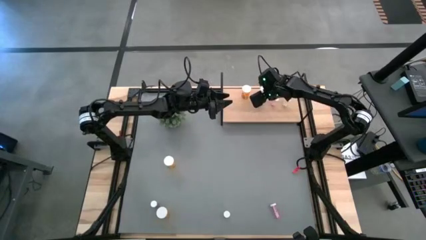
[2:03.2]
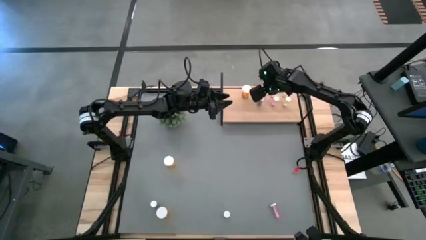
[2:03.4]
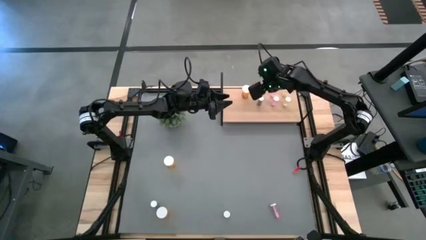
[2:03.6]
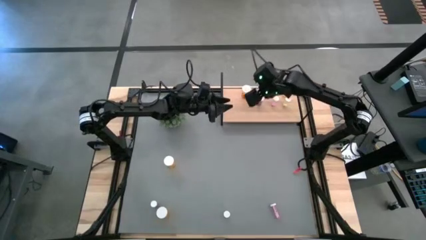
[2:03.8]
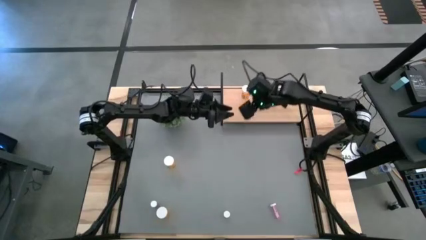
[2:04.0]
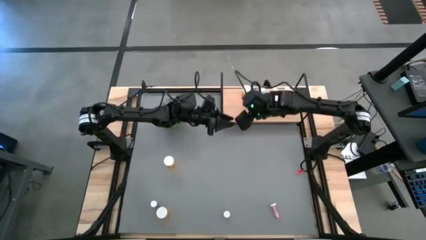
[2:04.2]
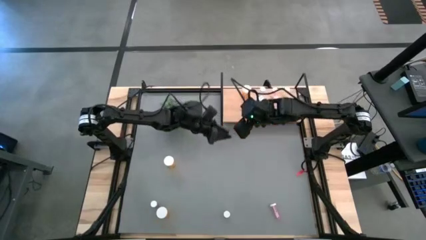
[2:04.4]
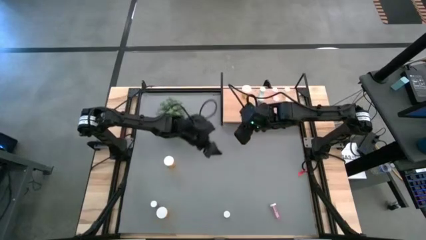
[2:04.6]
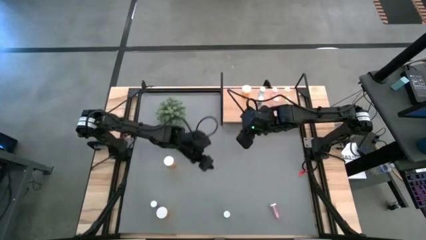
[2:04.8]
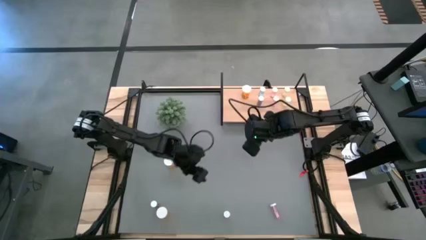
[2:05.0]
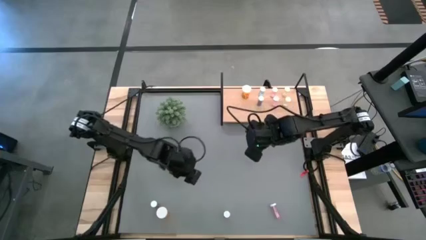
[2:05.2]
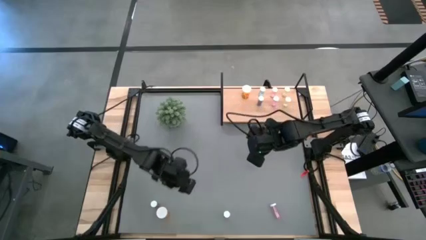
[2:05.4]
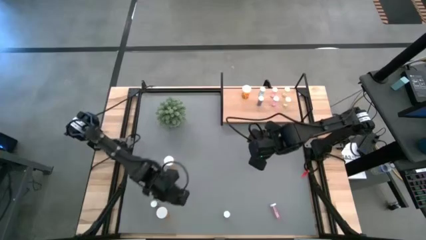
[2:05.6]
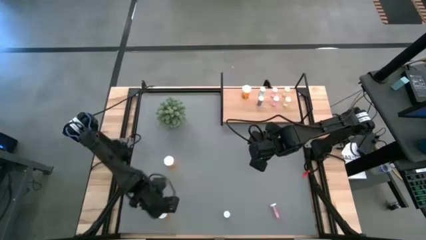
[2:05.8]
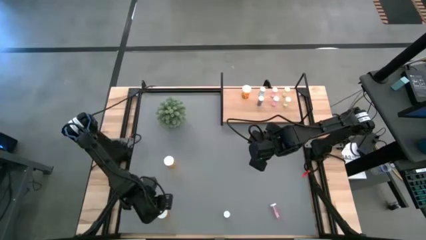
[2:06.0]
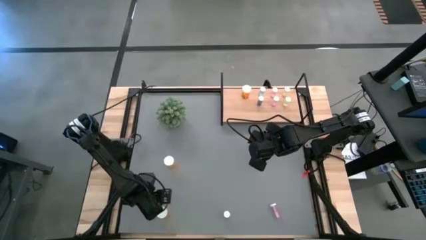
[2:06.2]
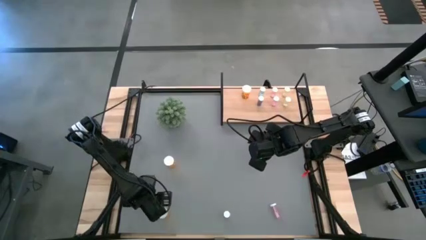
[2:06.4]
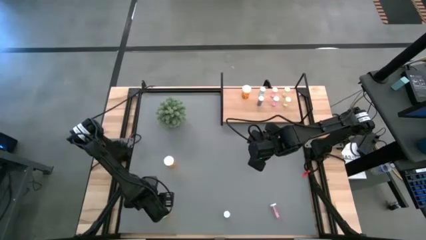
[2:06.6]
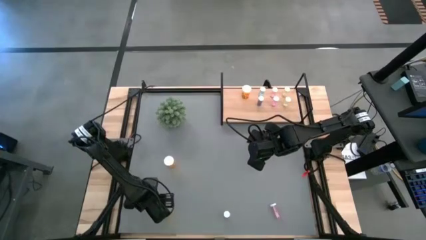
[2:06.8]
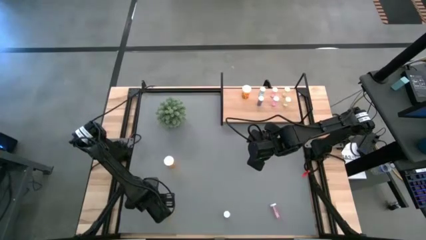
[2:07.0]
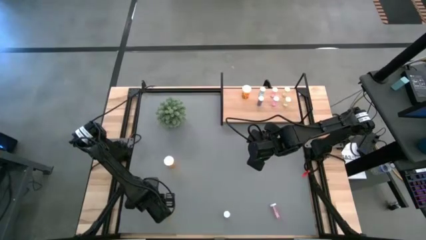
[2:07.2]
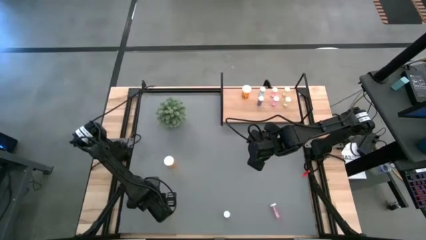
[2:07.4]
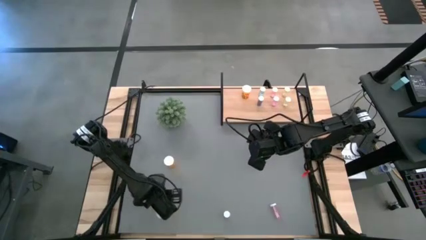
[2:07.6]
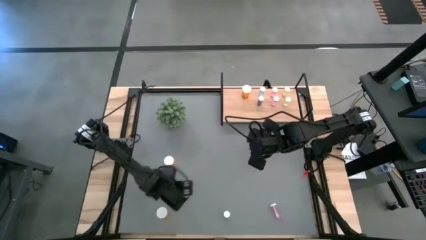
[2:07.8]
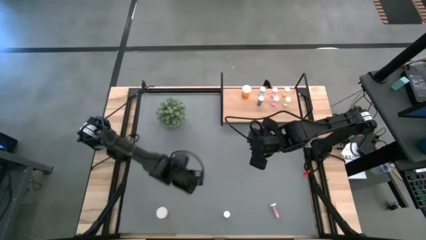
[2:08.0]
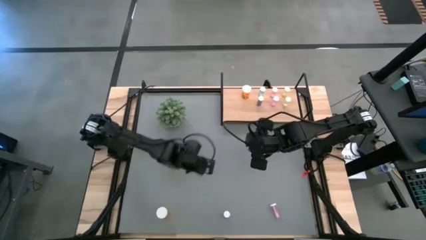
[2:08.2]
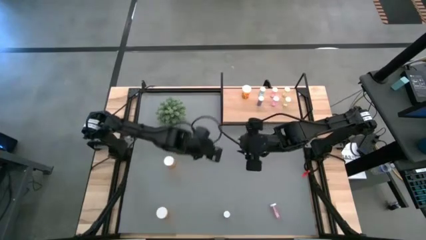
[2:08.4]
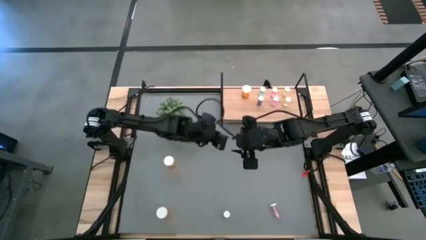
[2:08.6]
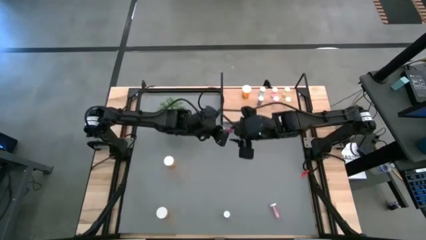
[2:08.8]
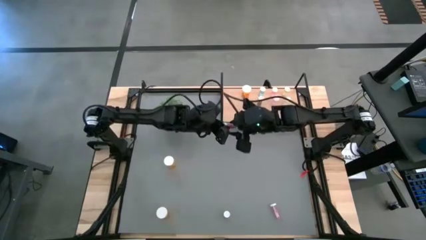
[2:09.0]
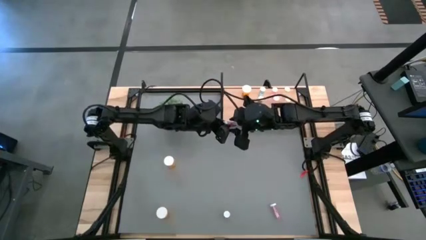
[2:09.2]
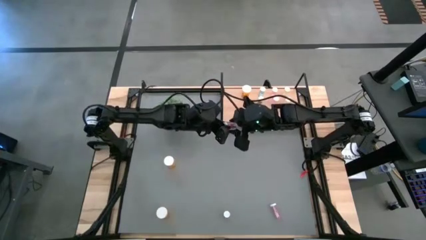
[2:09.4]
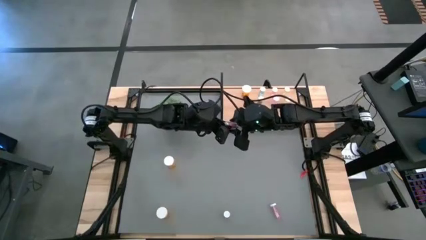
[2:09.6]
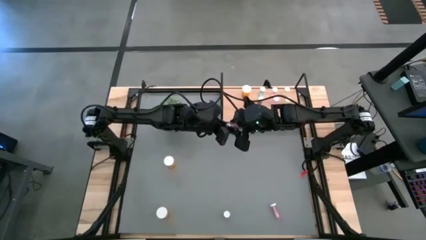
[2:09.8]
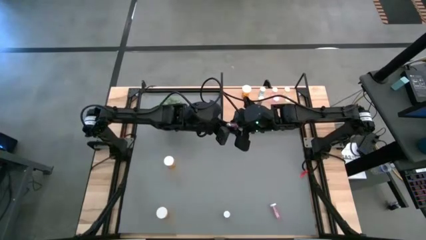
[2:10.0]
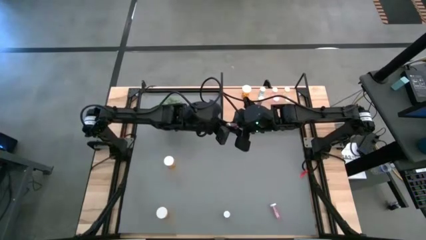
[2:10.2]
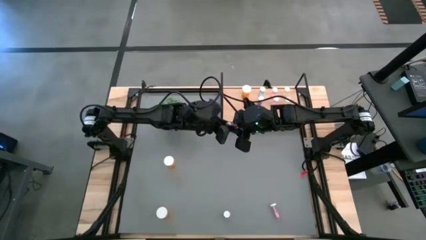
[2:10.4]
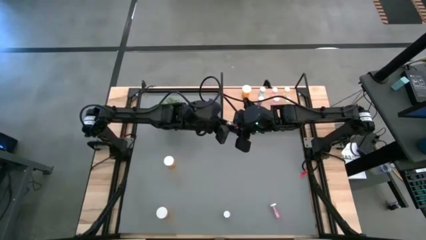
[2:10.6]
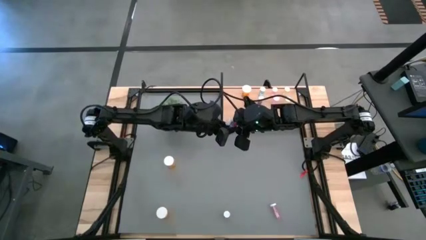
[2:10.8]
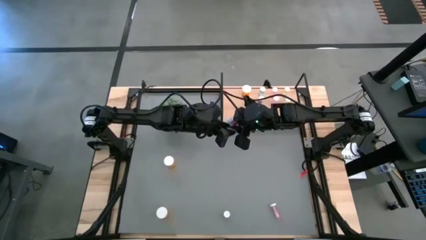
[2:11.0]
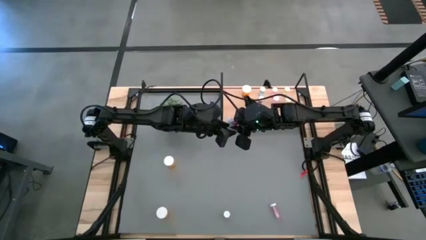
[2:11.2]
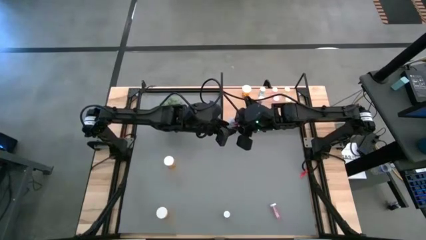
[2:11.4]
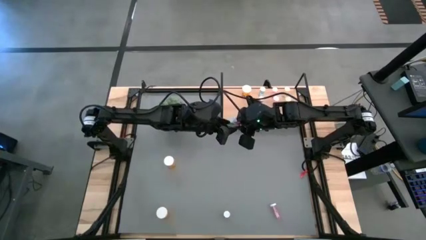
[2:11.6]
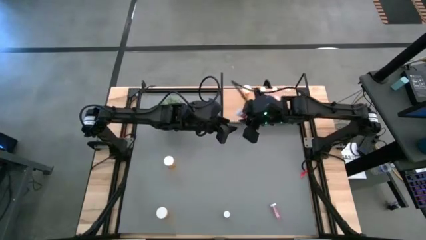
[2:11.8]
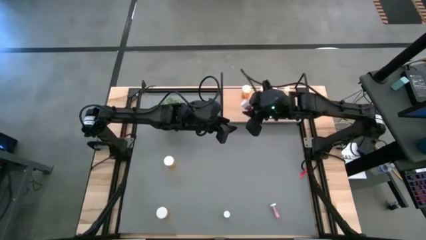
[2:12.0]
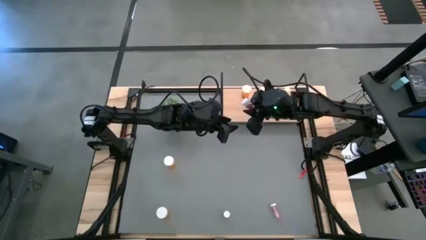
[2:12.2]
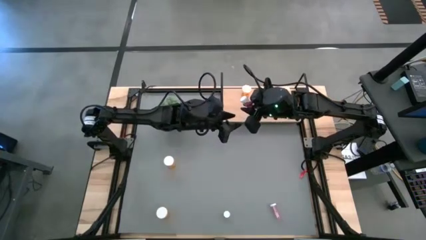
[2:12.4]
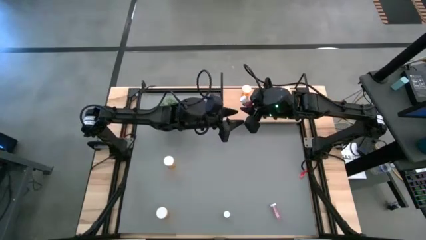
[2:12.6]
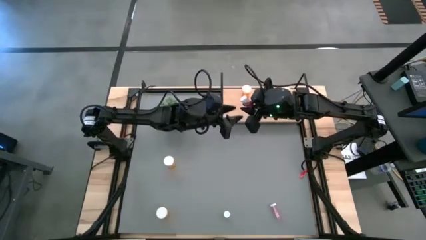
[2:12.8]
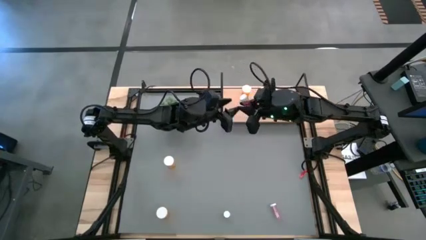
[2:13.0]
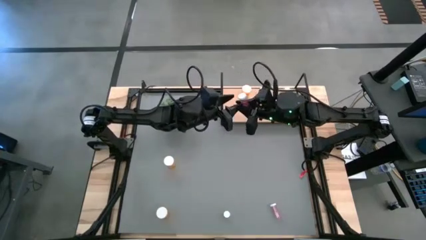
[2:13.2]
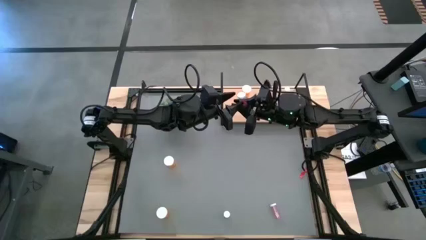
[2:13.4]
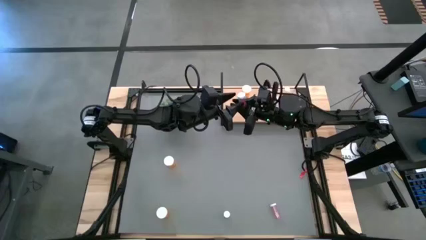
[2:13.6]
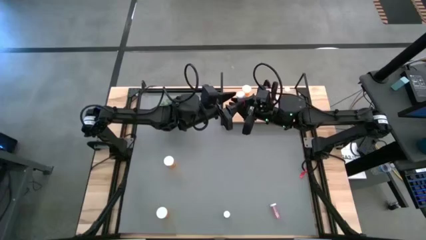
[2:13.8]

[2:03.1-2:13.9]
Task: Pick and place medicine bottles onto shelf by color
Put the blue pill bottle on the shelf aligned with the other blue pill bottles
